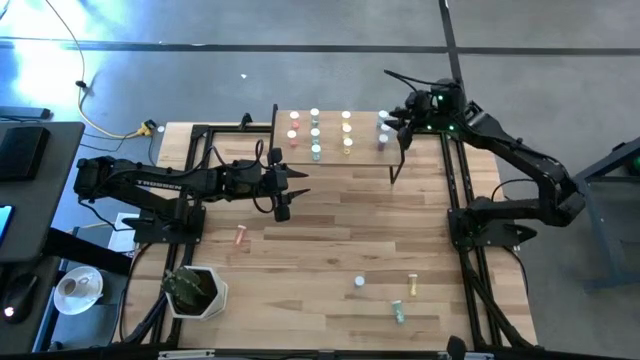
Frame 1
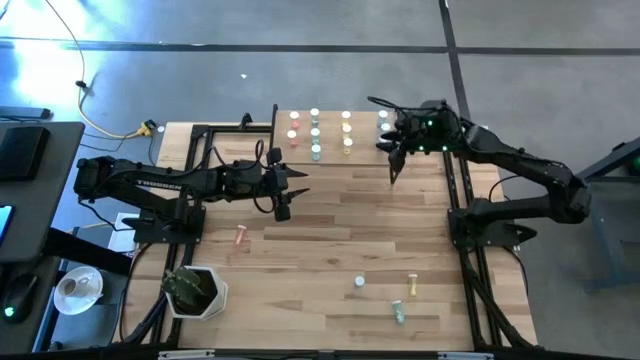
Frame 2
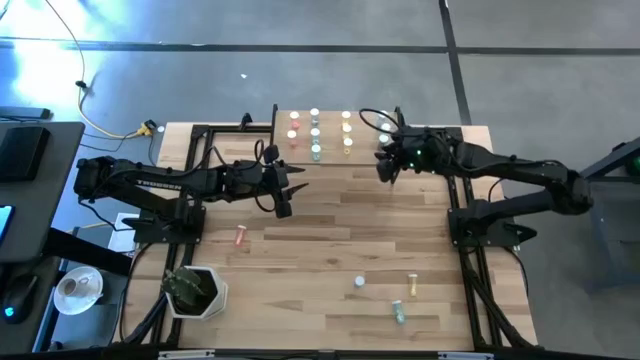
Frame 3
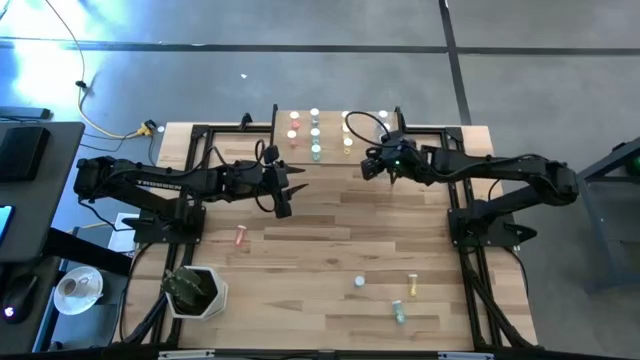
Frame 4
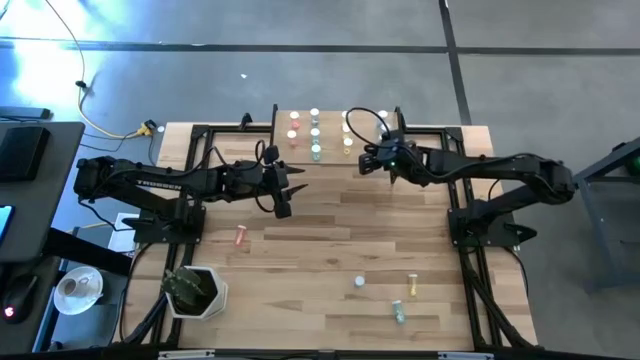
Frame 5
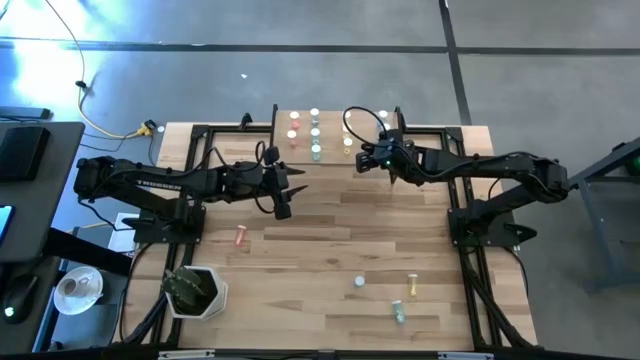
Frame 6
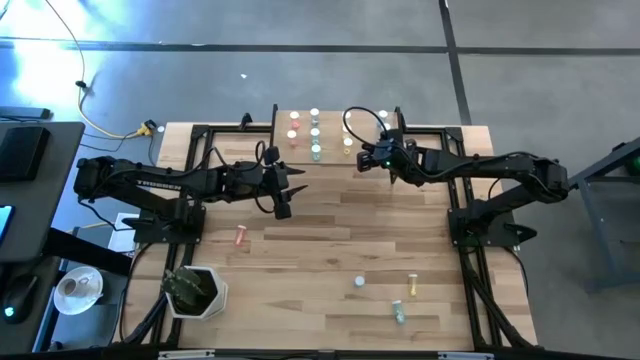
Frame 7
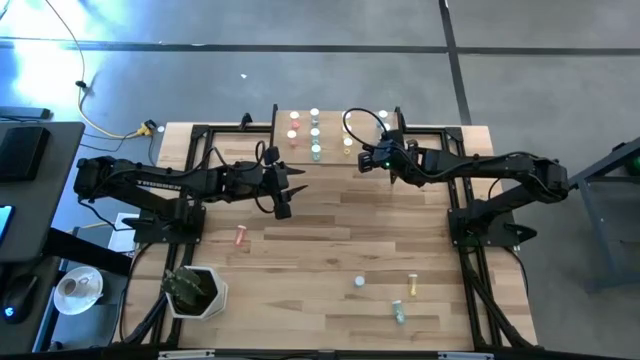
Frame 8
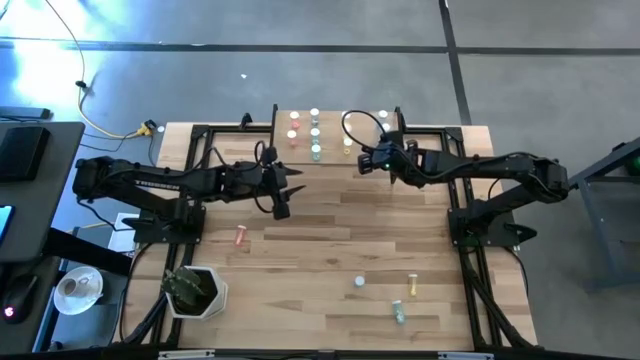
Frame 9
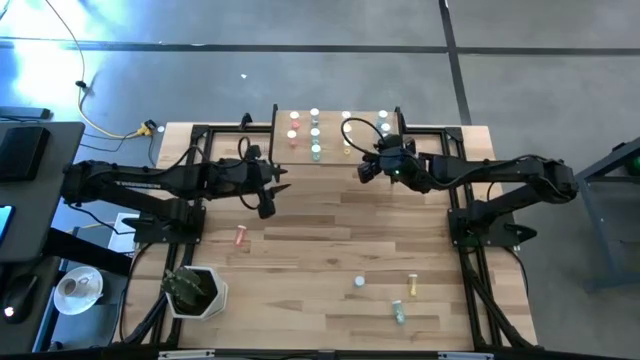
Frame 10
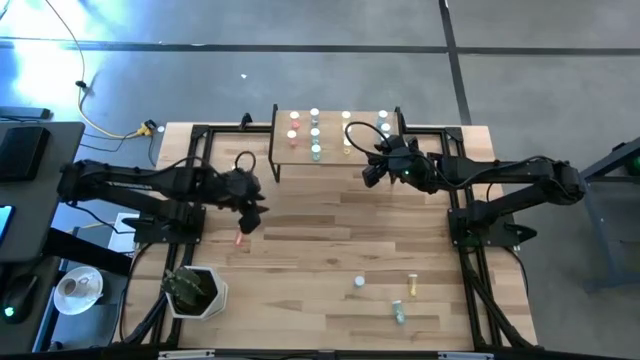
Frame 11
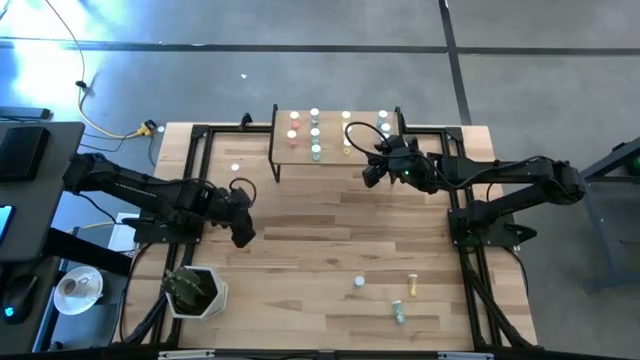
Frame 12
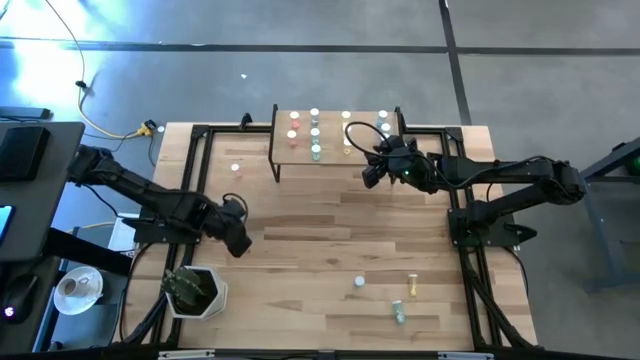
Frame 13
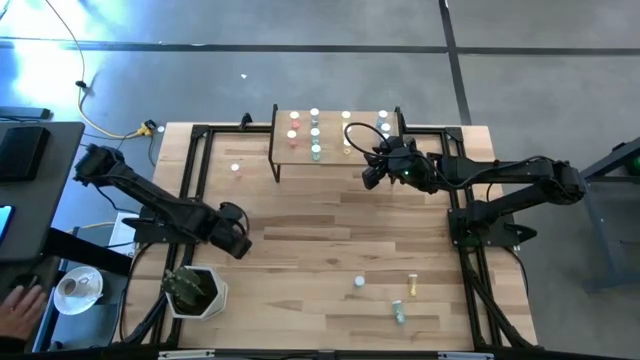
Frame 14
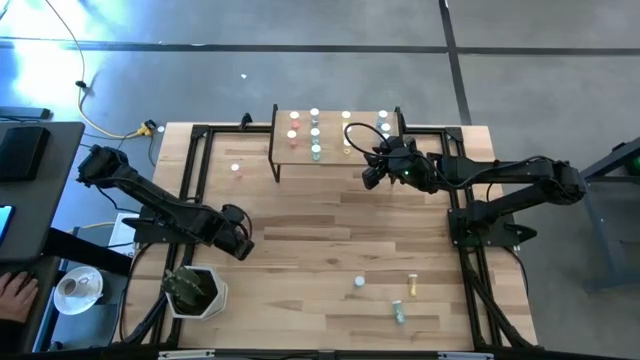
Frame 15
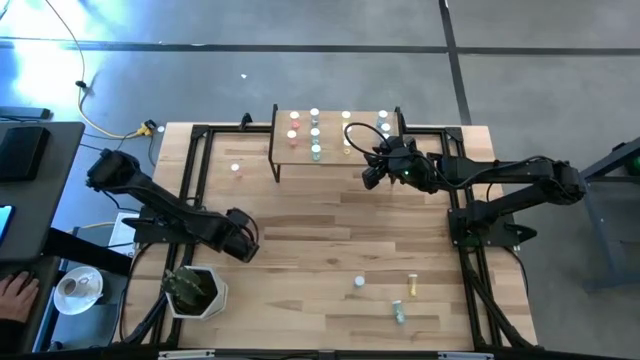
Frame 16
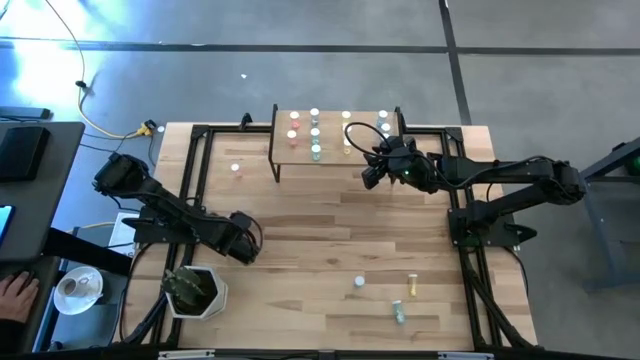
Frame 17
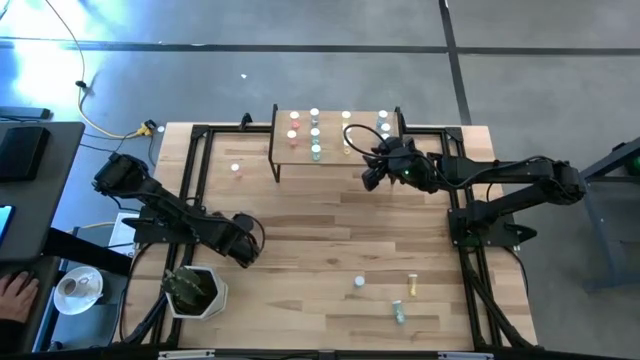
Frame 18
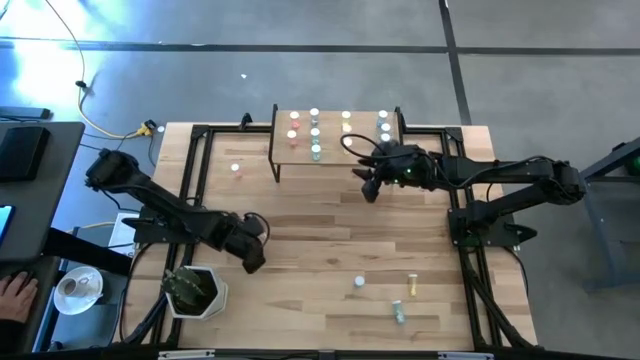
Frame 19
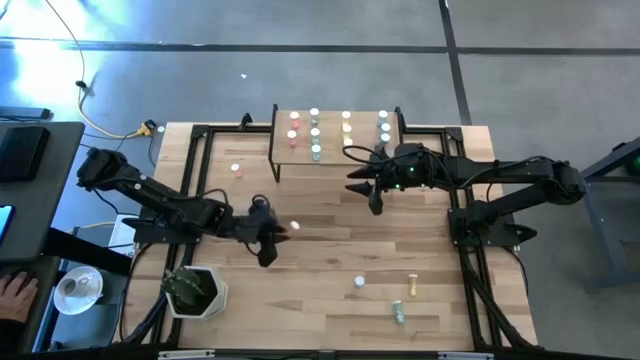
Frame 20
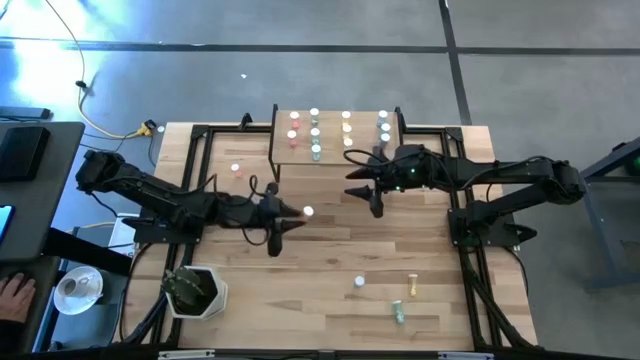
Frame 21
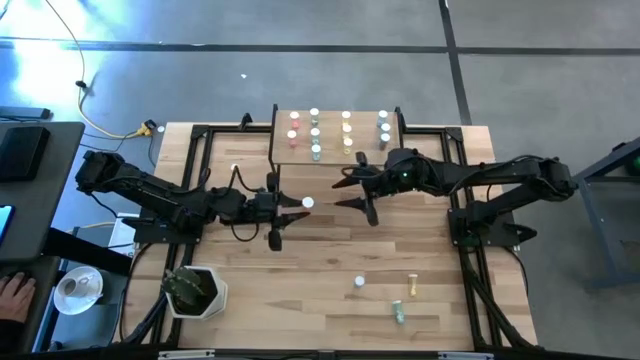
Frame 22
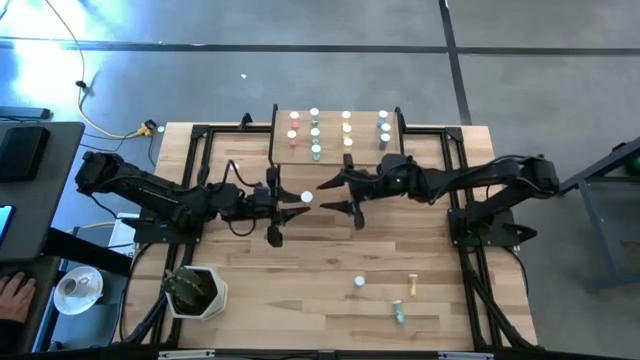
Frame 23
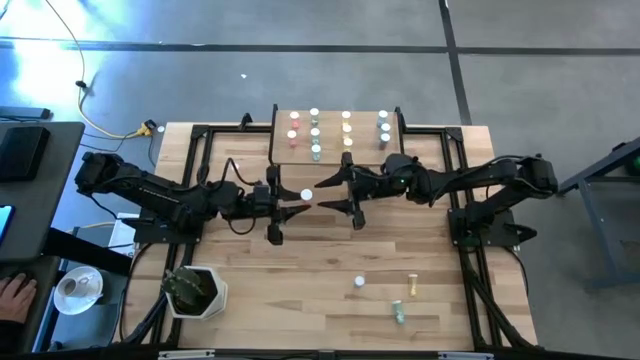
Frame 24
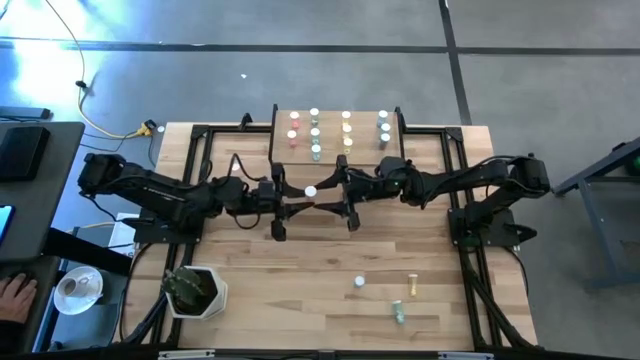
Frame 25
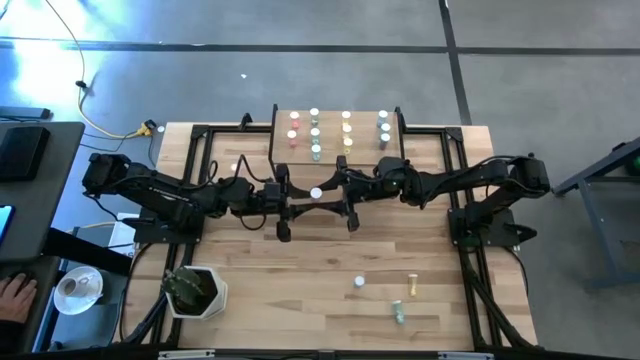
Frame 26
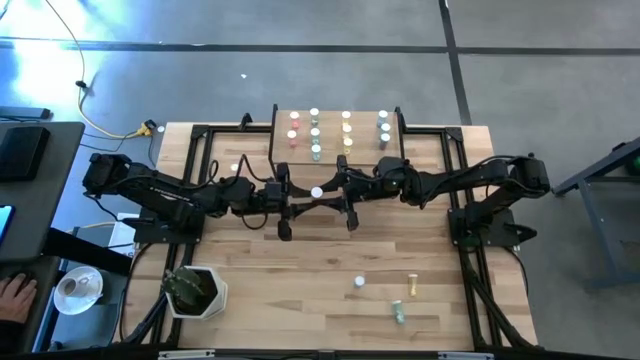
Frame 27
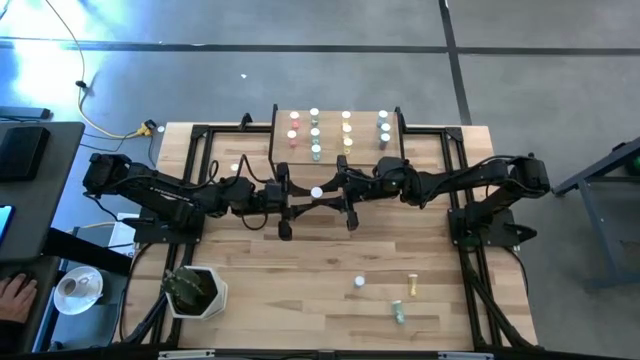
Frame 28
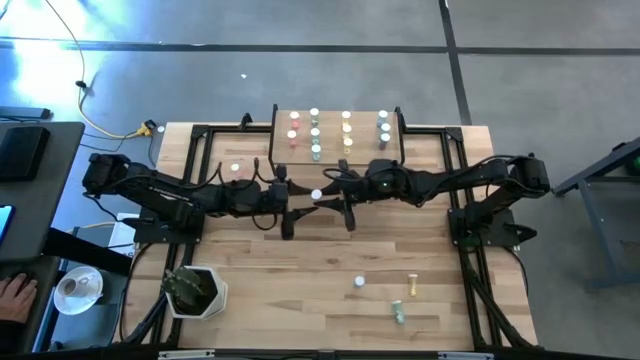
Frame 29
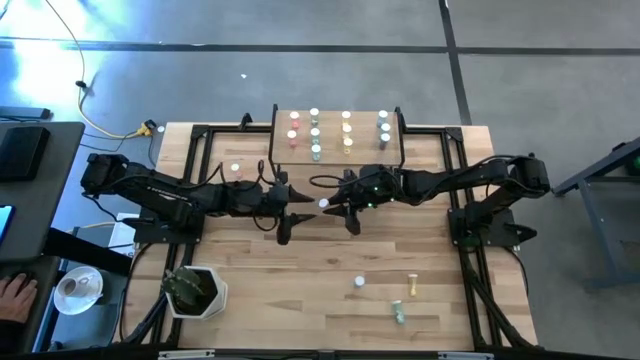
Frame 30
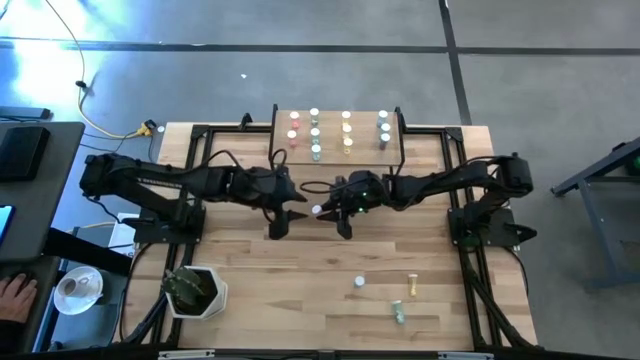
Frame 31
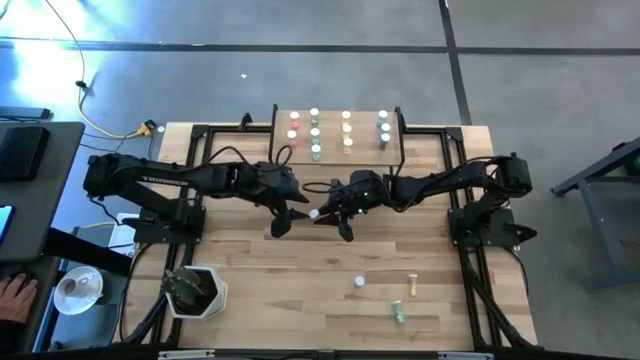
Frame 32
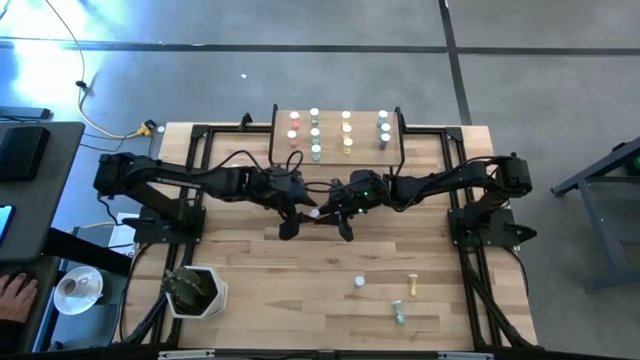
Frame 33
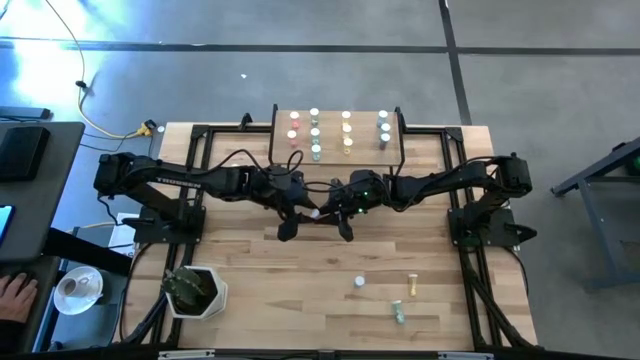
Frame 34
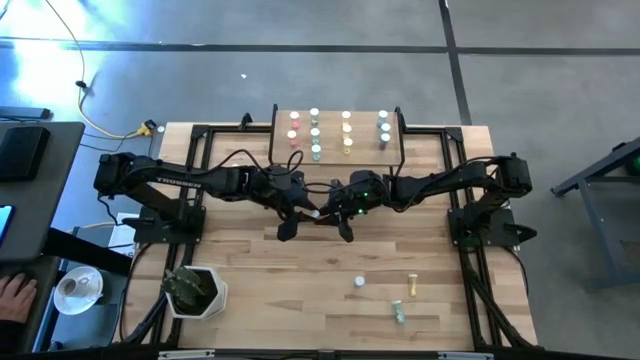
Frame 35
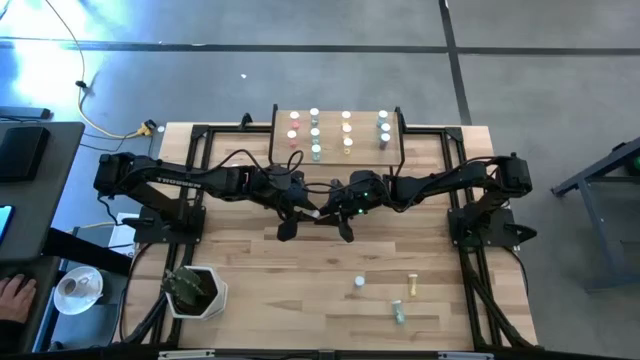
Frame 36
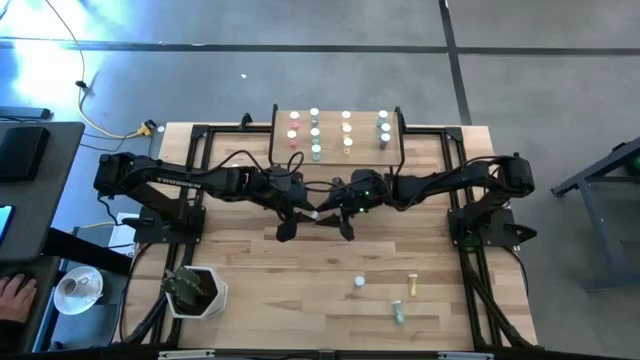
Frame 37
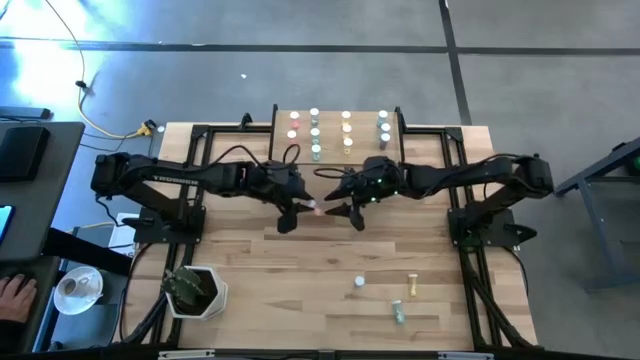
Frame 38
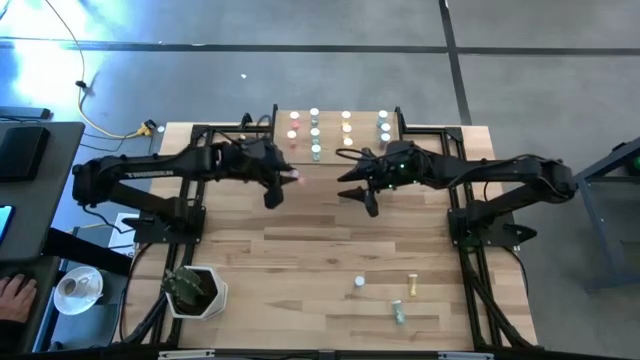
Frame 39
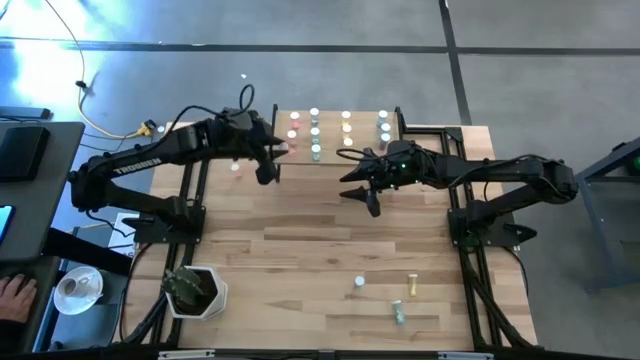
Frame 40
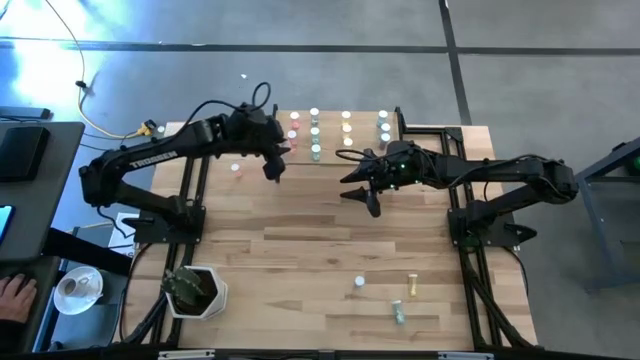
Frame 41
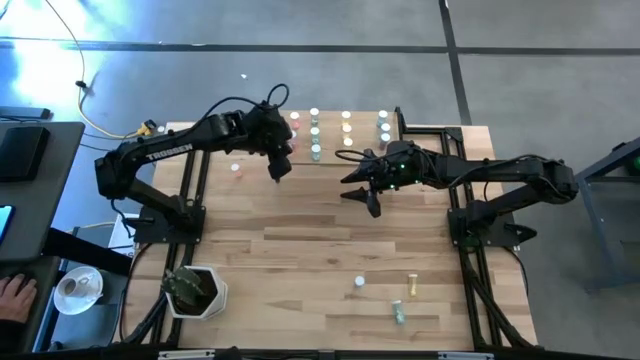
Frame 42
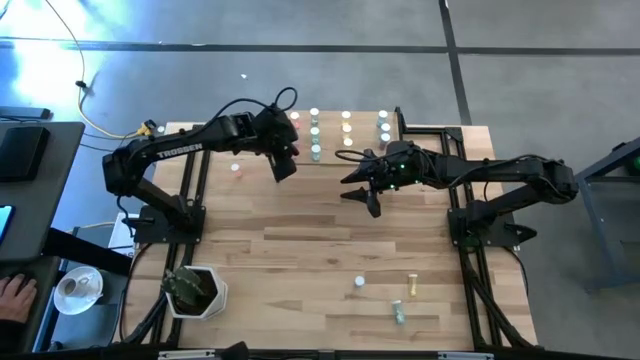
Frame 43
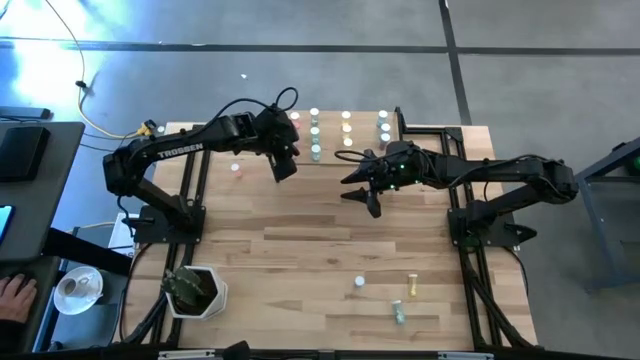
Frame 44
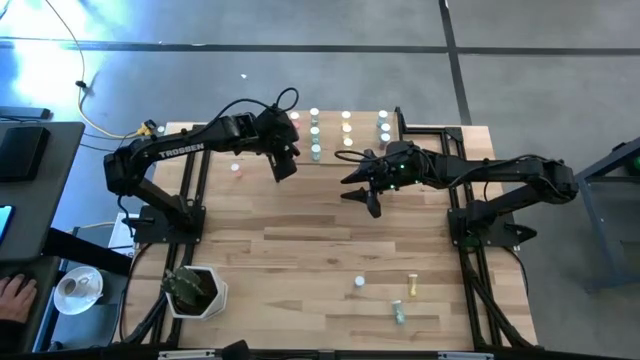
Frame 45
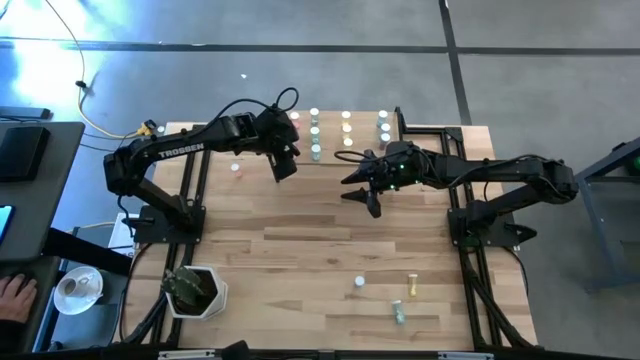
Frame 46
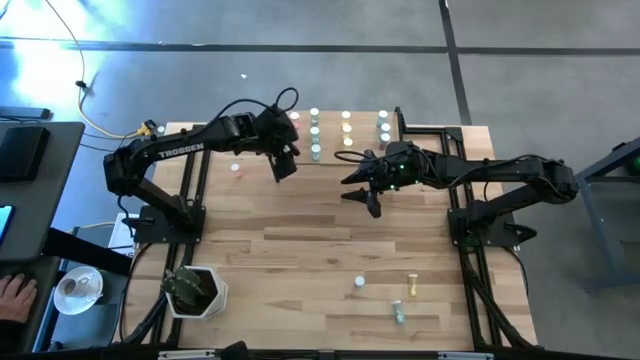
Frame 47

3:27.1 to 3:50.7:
Task: Pick and place medicine bottles onto shelf by color
Put the red medicine bottle on the shelf
